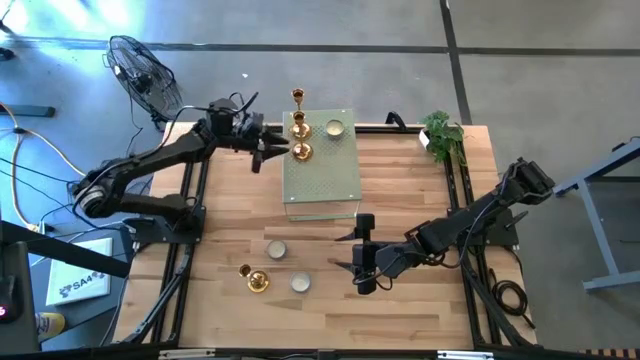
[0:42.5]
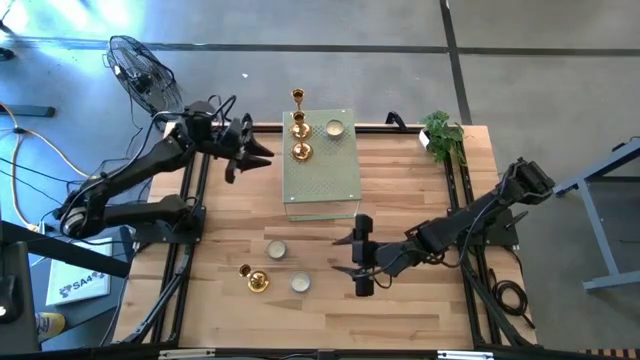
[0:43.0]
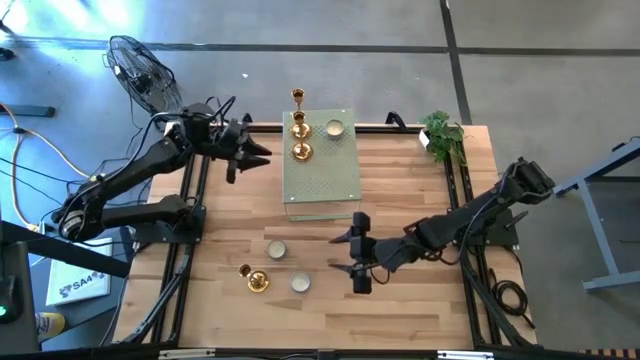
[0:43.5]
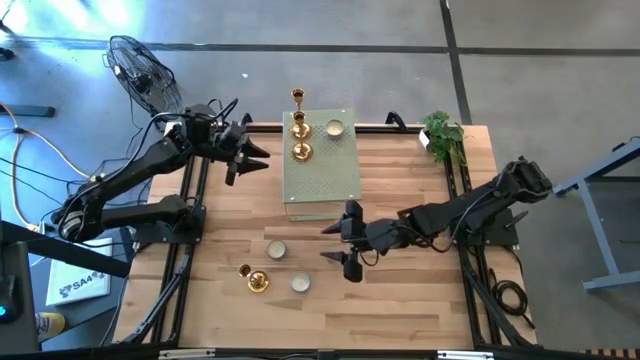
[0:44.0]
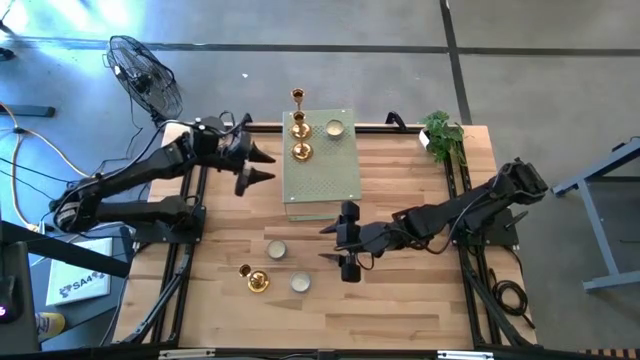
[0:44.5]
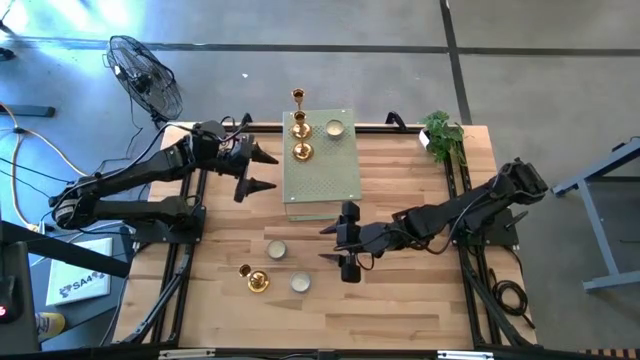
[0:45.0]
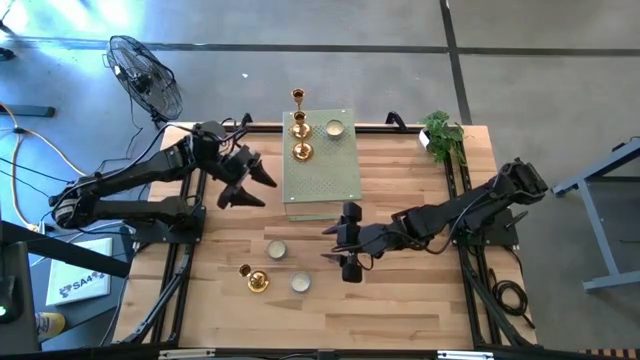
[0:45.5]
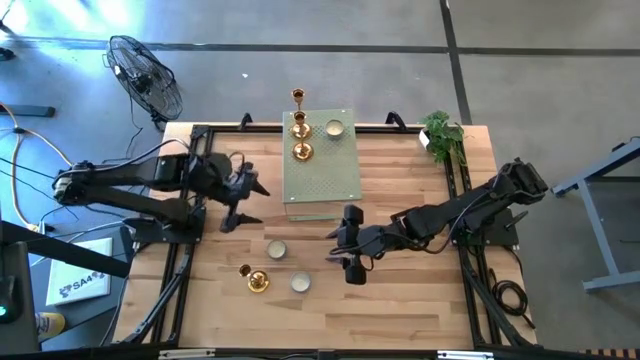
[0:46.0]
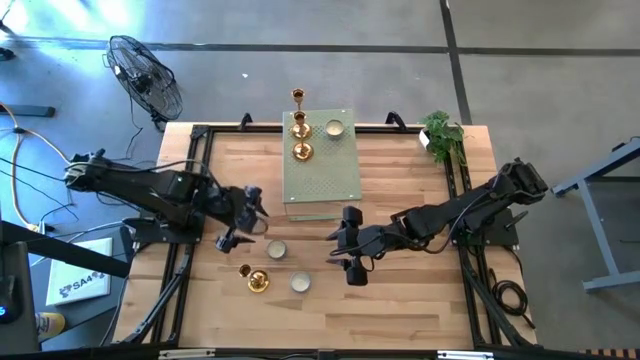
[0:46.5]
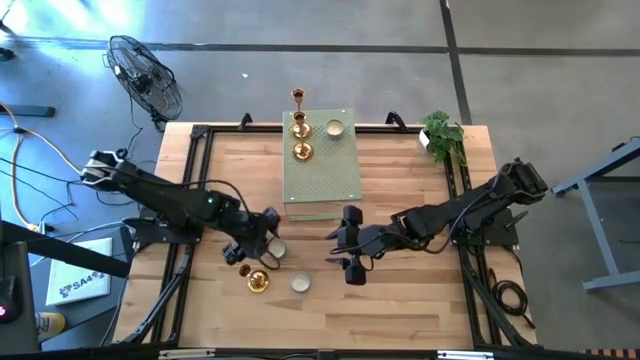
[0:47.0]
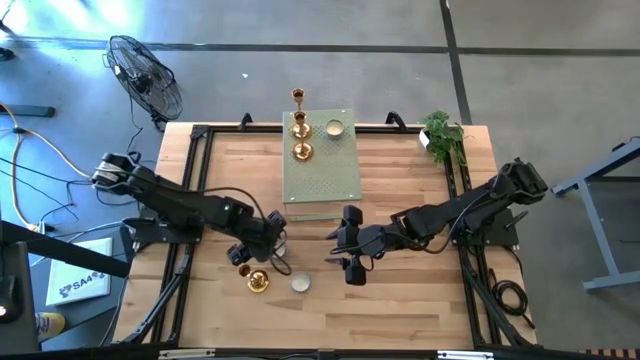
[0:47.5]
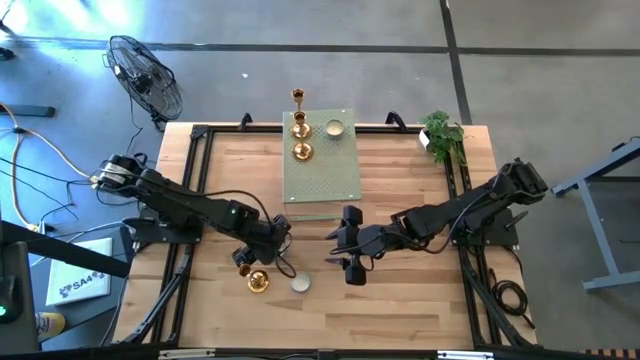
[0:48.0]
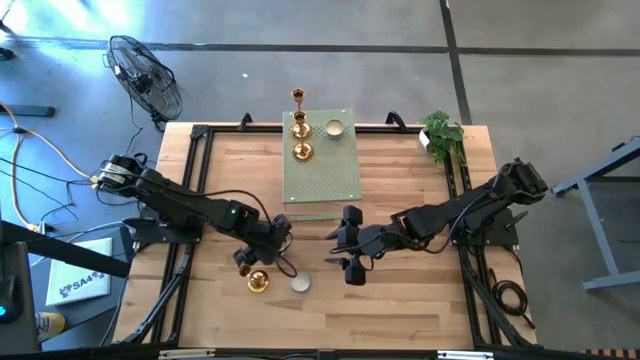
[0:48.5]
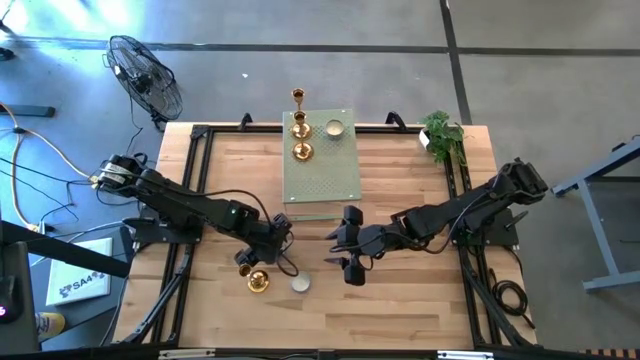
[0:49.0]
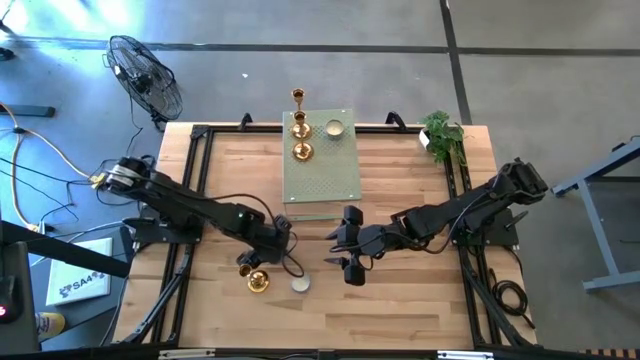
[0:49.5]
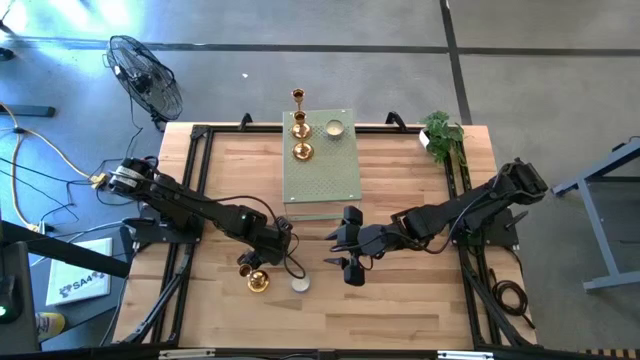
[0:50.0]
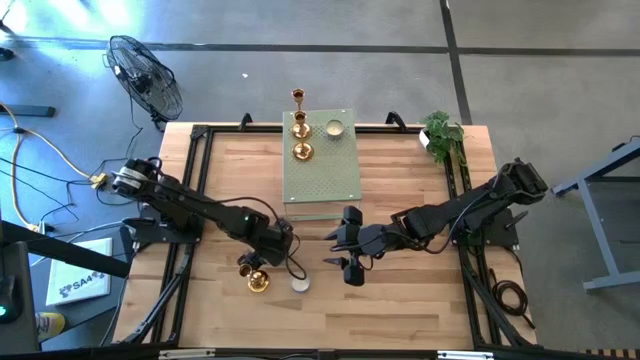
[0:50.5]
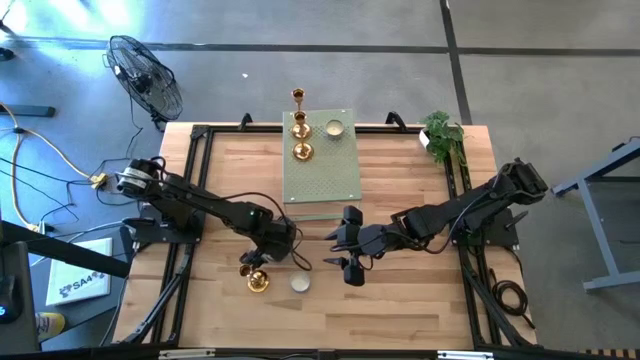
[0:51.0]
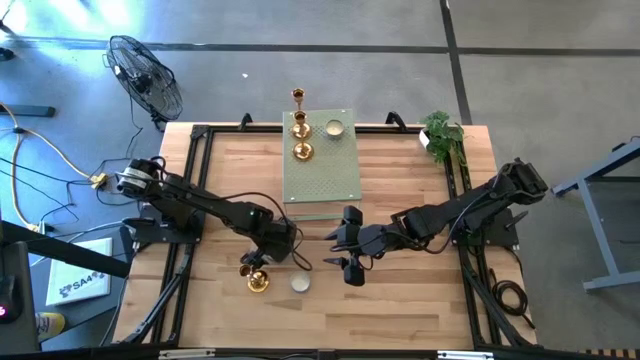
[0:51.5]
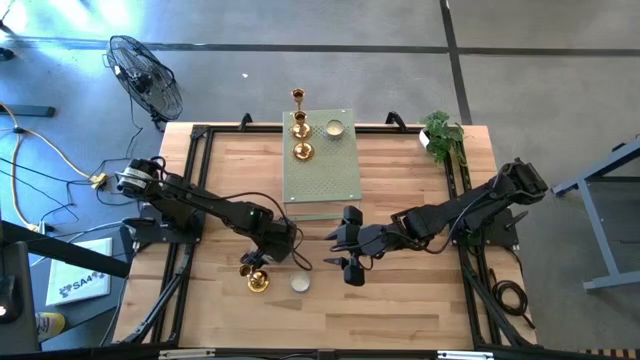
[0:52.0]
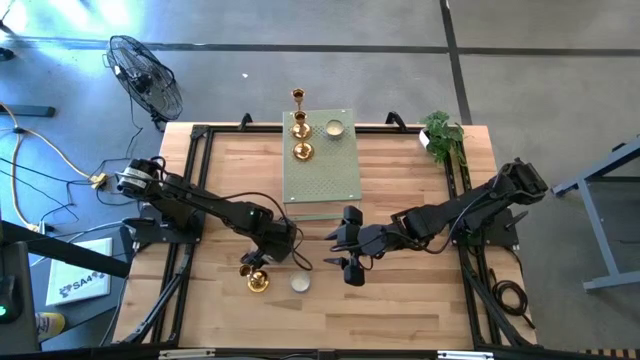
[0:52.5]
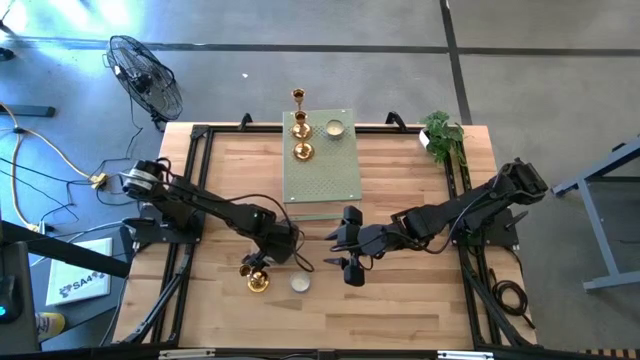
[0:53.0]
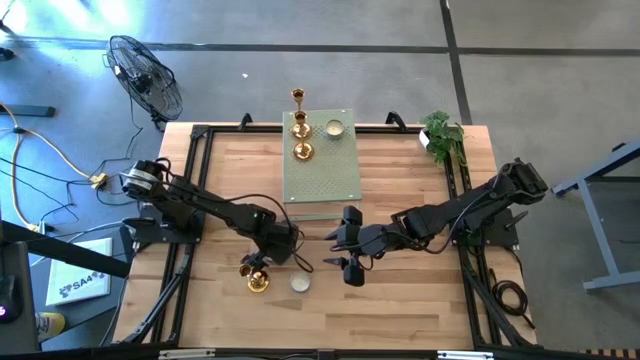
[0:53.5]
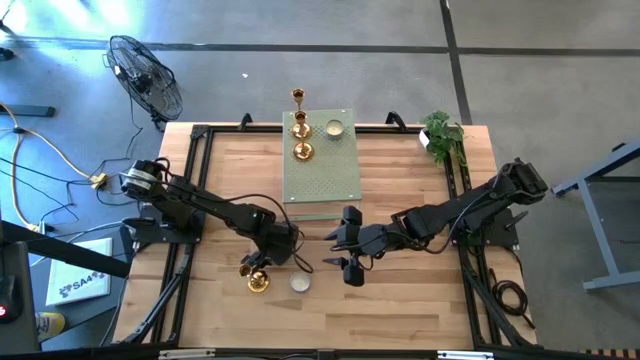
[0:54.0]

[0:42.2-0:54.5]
Task: Pick & Place candle stick holders
Put the top blue scented candle on the shelf aligned with the other blue scented candle

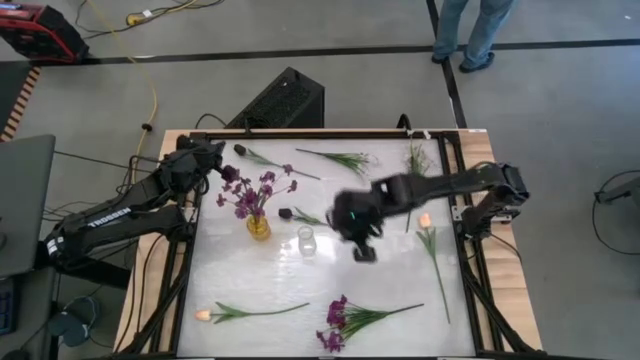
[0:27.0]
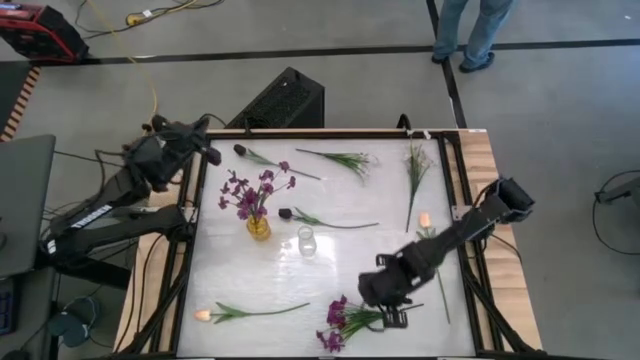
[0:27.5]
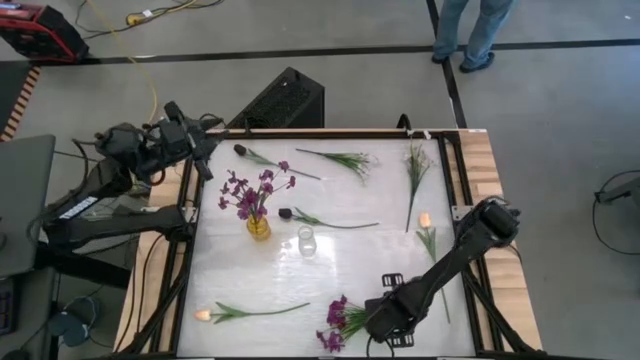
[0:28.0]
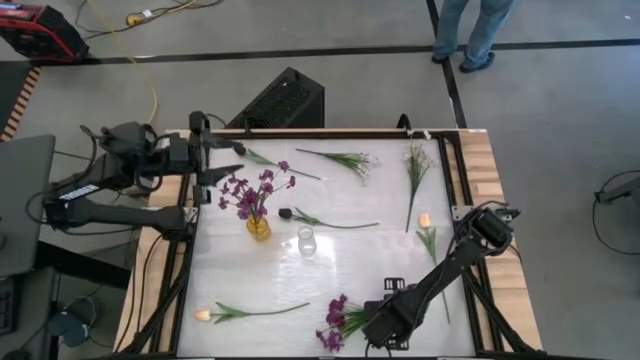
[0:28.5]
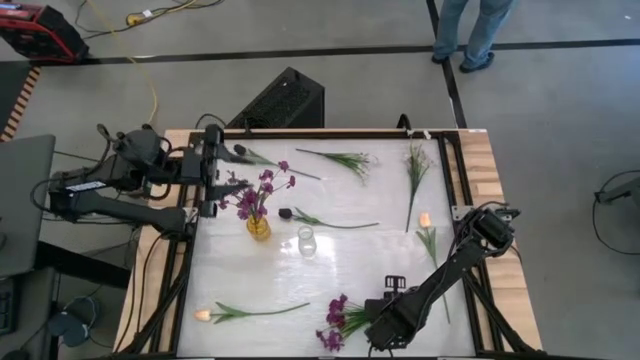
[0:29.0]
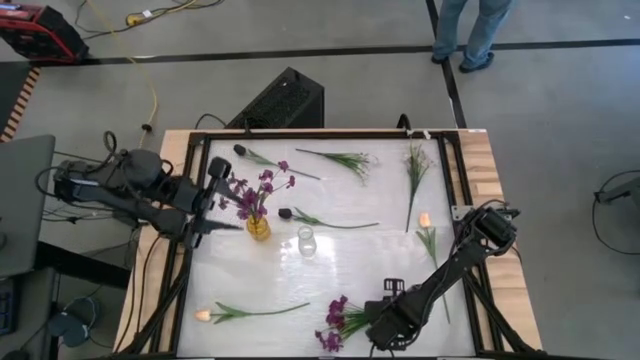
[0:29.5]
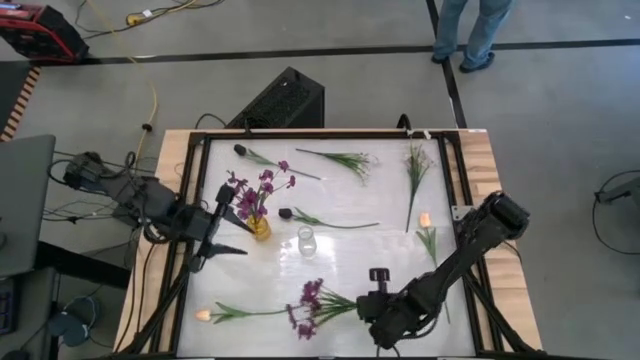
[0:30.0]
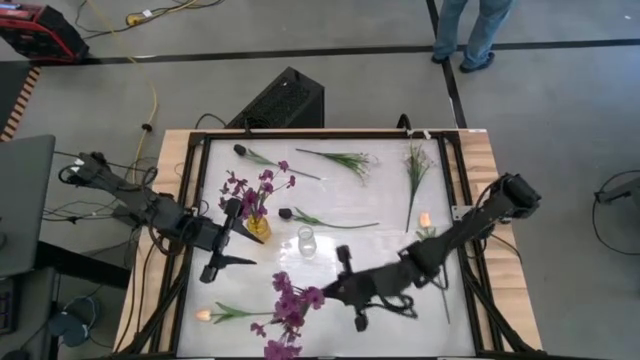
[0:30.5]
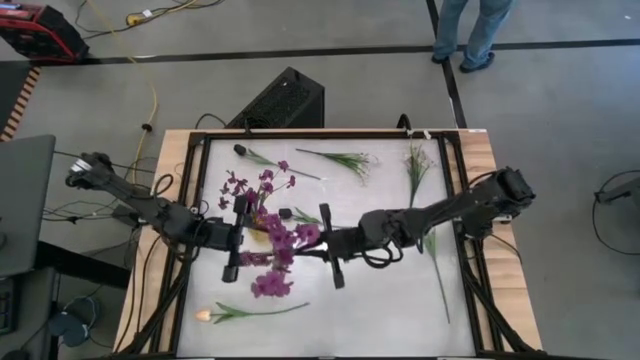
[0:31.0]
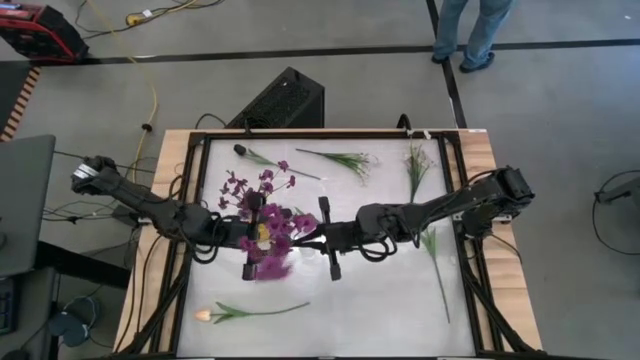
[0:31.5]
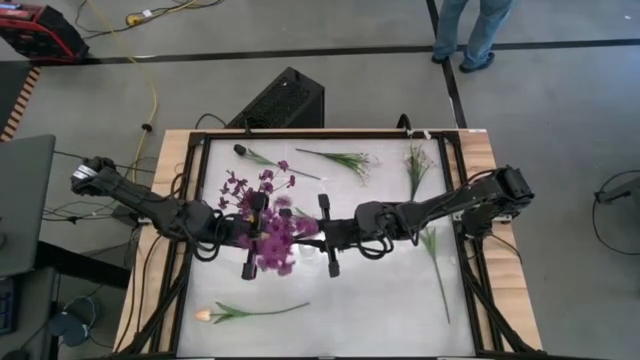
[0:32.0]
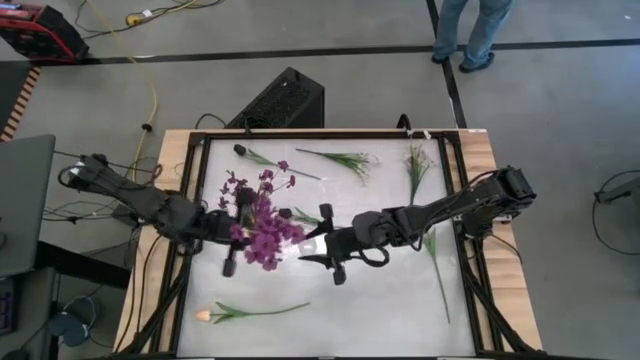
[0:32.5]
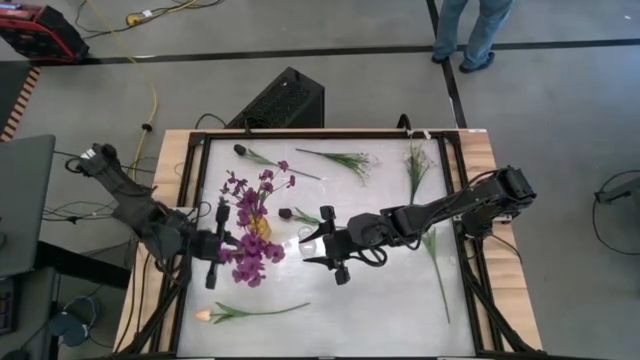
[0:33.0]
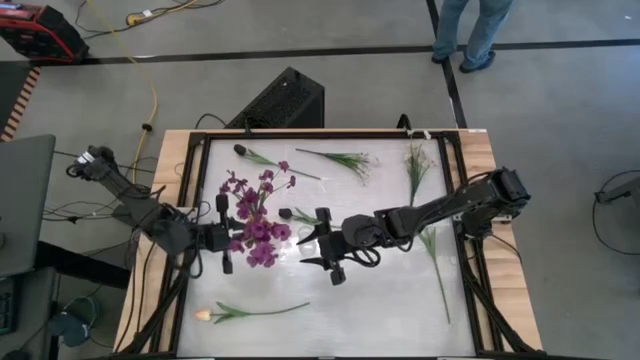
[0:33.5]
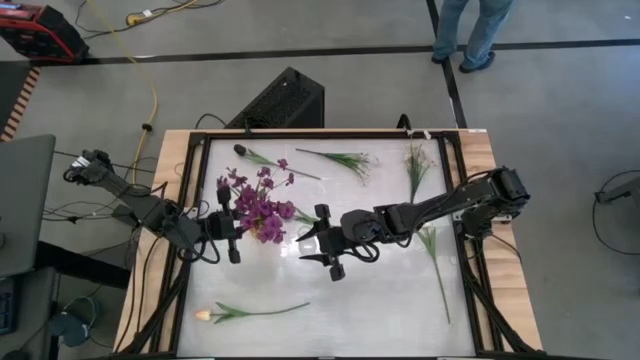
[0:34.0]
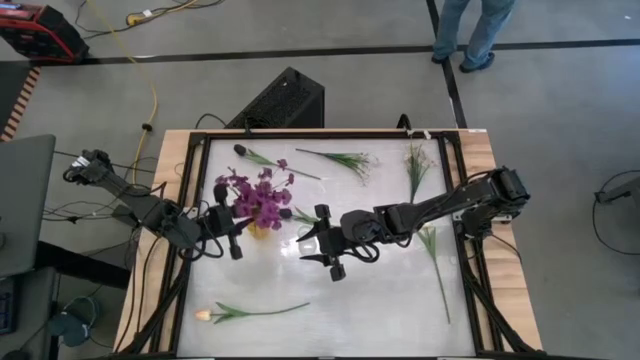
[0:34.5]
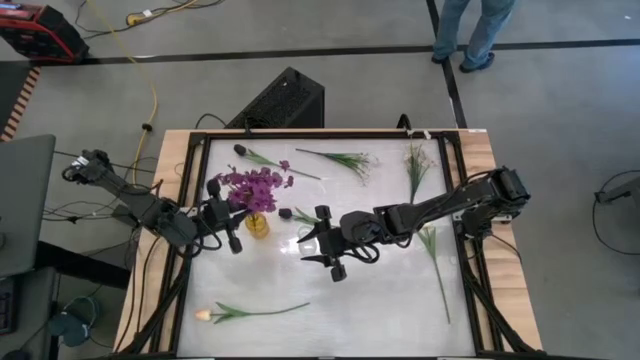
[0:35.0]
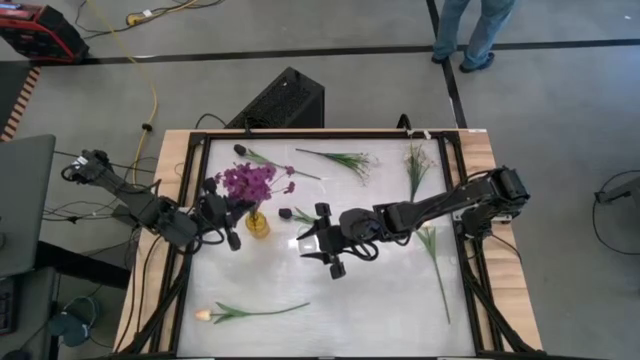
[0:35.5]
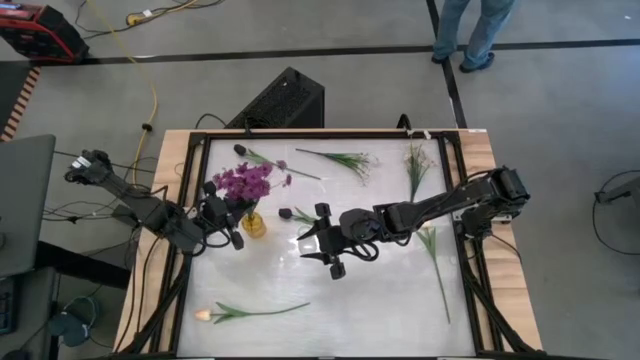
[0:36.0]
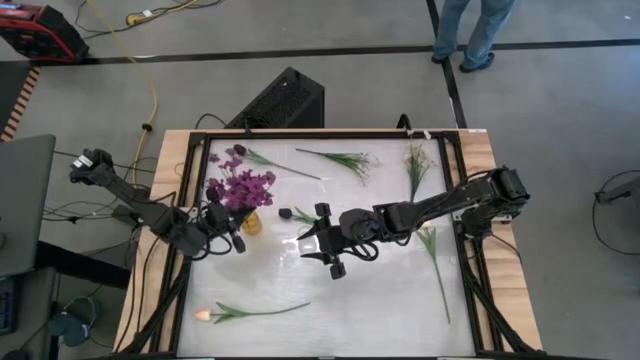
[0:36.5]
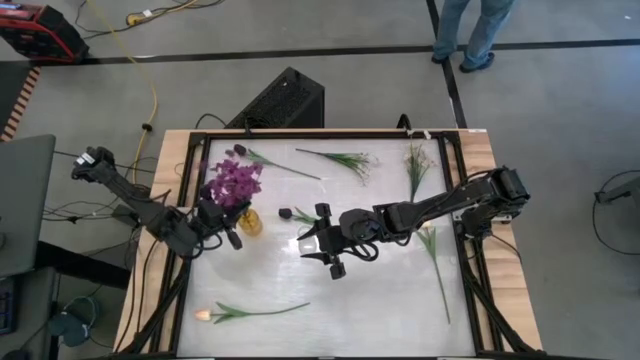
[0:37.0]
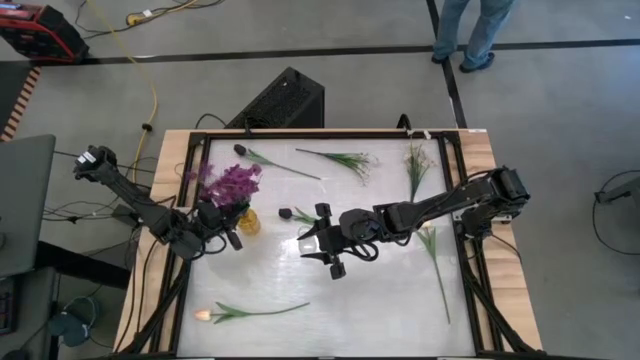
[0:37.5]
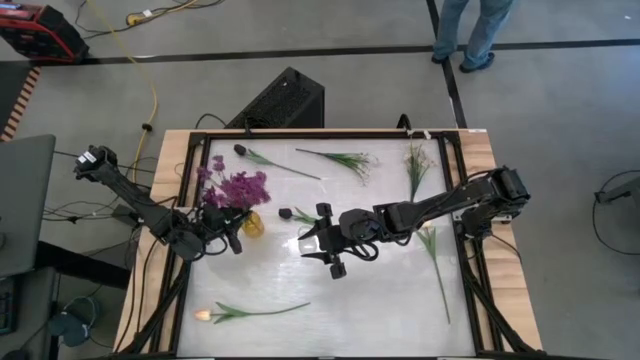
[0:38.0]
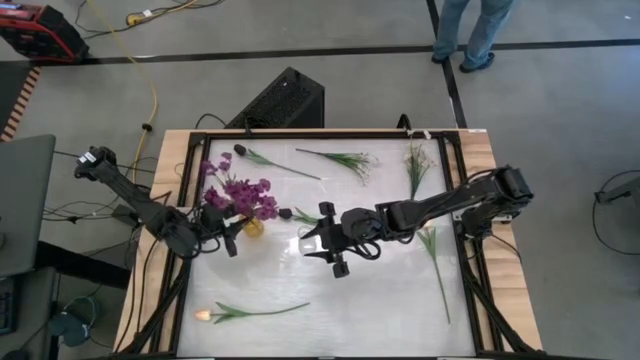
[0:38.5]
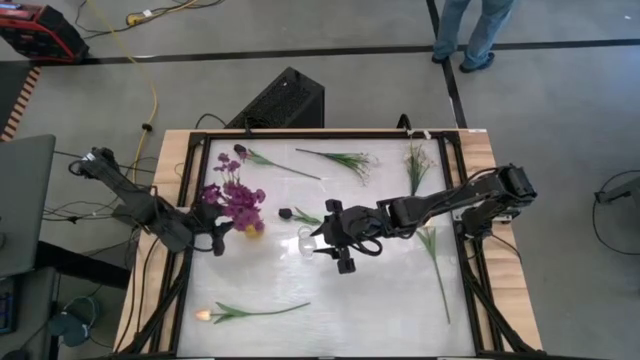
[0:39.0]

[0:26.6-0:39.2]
Task: Sort flowers into vase by color
Put the purple flower into the yellow vase
